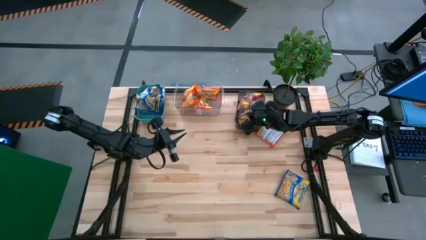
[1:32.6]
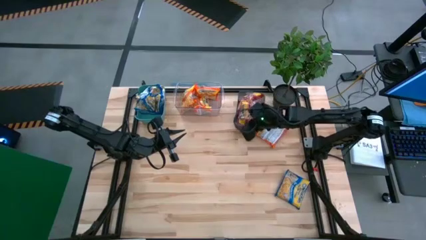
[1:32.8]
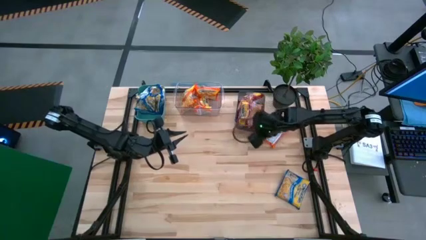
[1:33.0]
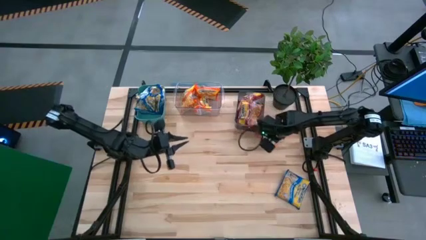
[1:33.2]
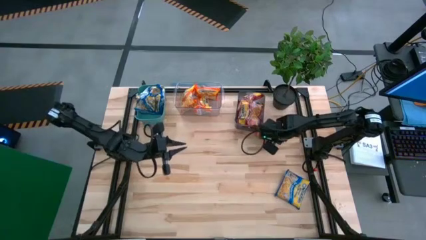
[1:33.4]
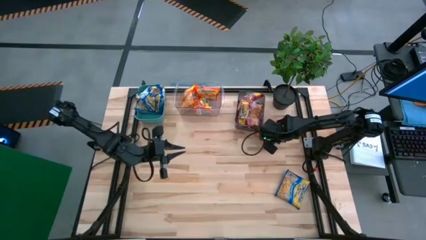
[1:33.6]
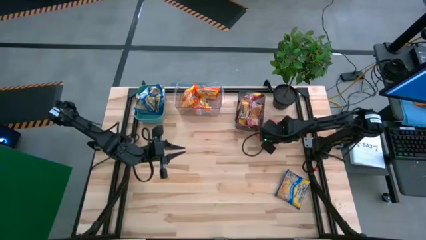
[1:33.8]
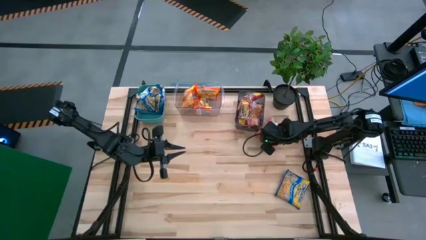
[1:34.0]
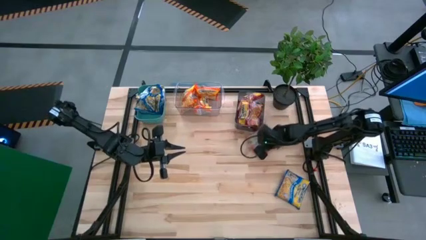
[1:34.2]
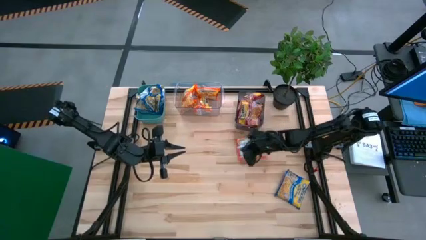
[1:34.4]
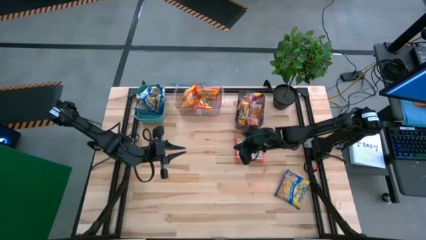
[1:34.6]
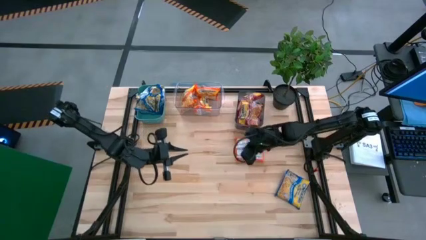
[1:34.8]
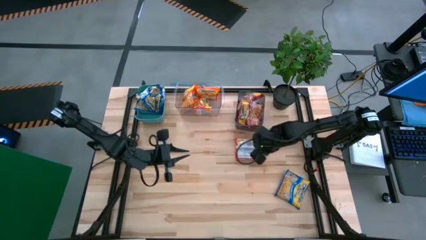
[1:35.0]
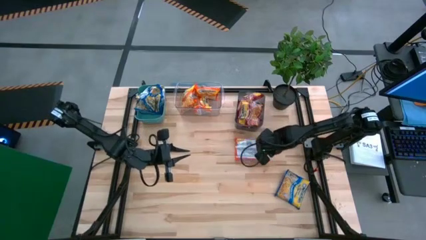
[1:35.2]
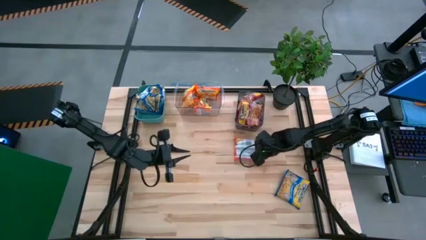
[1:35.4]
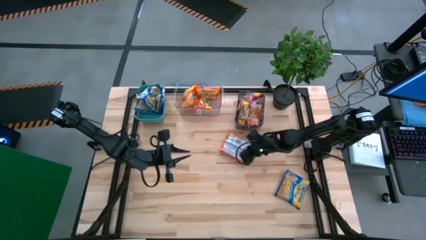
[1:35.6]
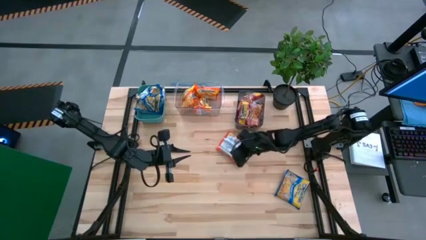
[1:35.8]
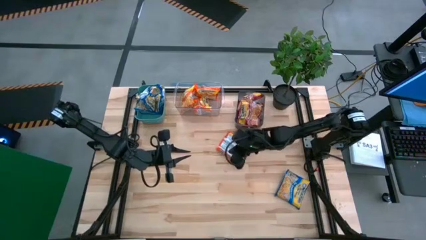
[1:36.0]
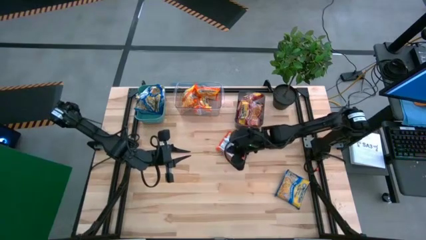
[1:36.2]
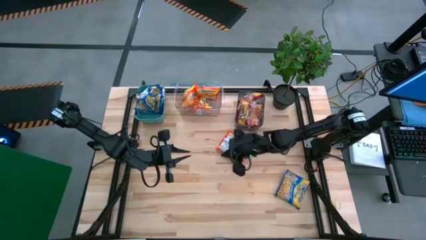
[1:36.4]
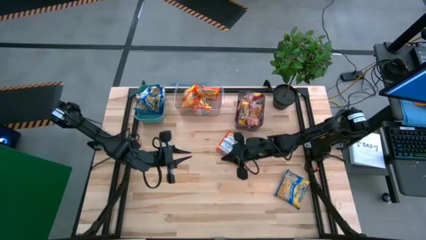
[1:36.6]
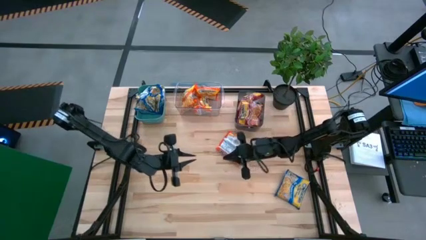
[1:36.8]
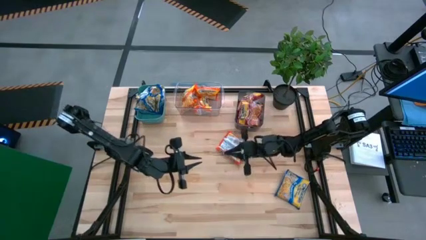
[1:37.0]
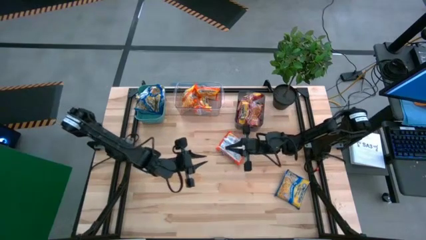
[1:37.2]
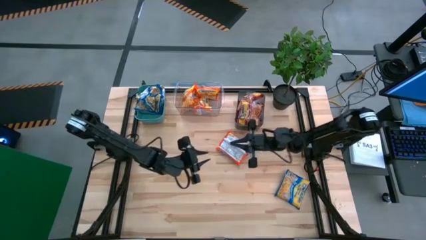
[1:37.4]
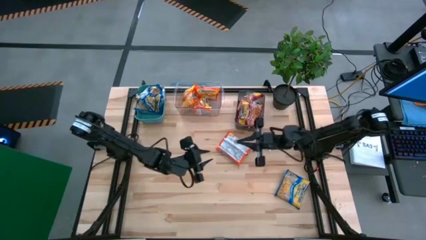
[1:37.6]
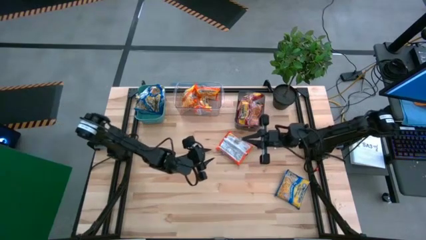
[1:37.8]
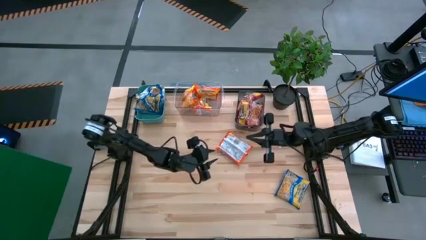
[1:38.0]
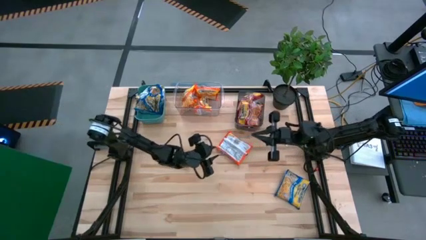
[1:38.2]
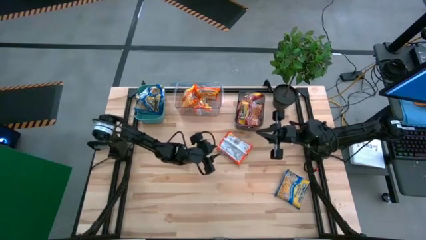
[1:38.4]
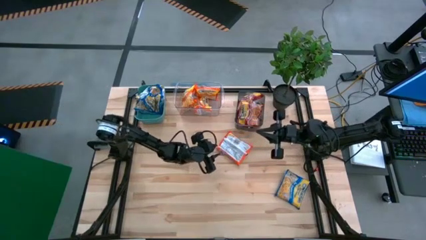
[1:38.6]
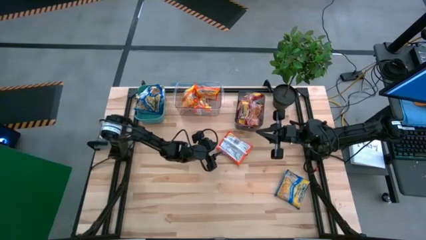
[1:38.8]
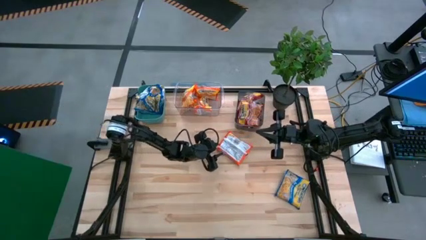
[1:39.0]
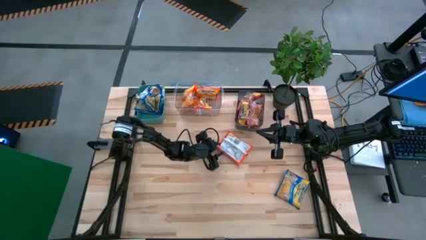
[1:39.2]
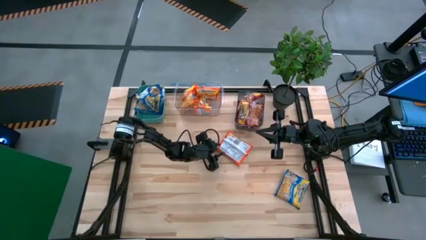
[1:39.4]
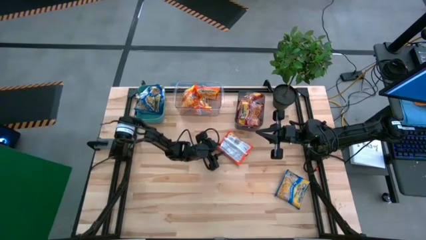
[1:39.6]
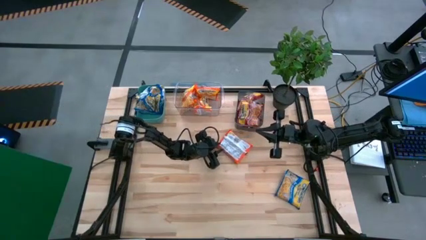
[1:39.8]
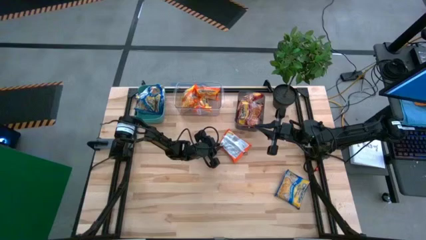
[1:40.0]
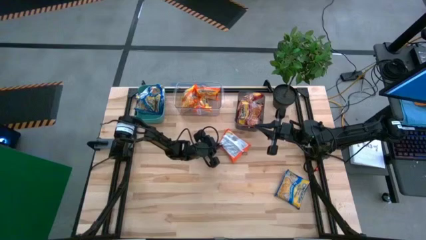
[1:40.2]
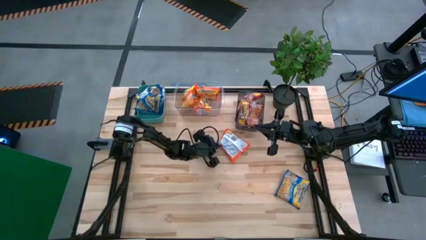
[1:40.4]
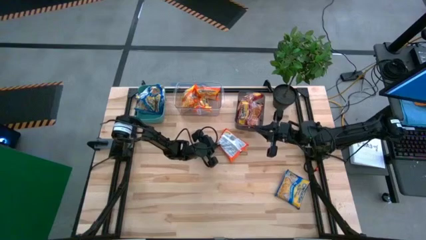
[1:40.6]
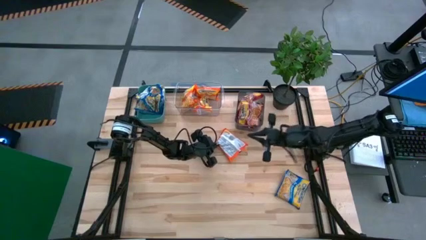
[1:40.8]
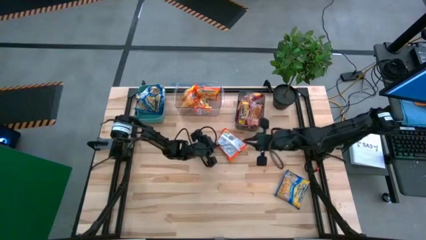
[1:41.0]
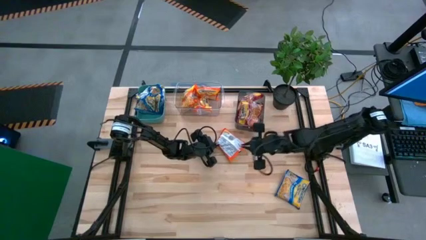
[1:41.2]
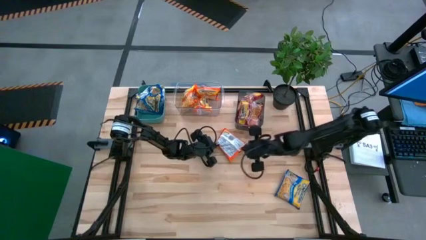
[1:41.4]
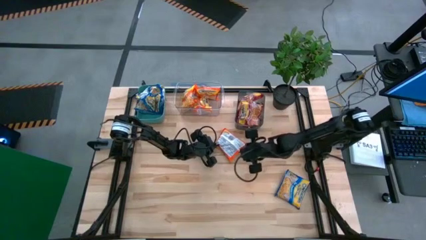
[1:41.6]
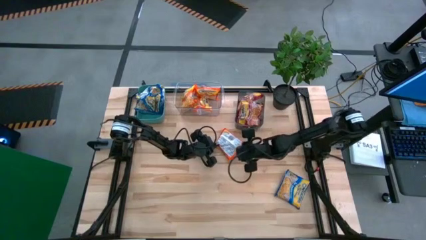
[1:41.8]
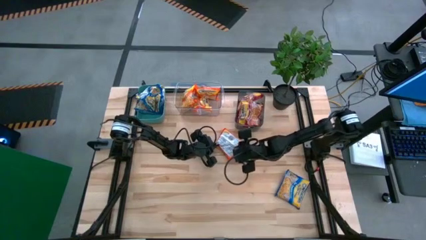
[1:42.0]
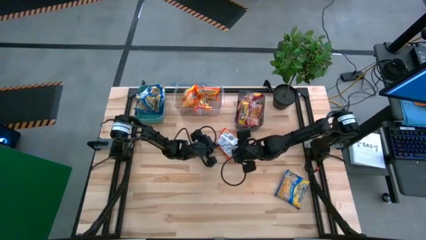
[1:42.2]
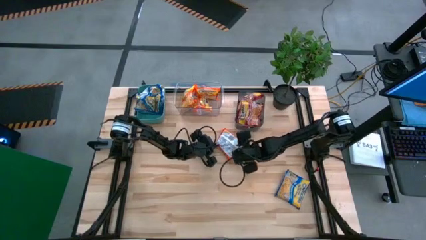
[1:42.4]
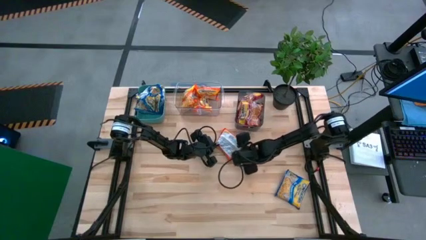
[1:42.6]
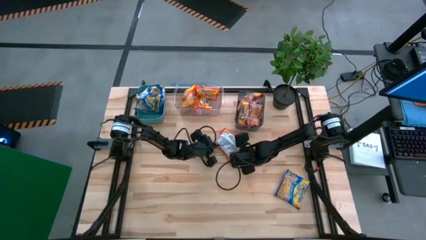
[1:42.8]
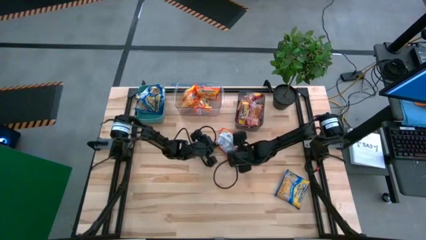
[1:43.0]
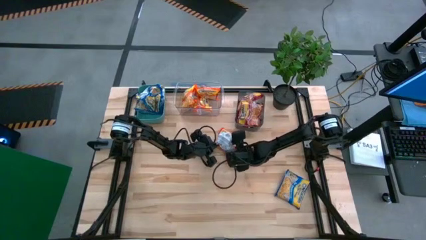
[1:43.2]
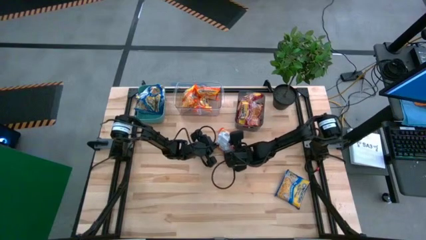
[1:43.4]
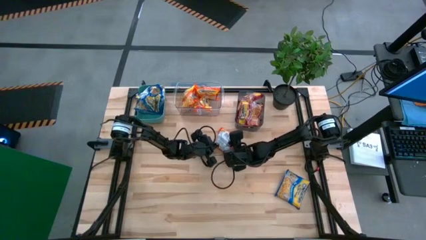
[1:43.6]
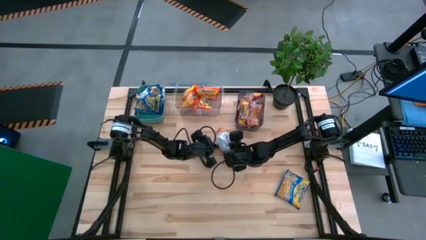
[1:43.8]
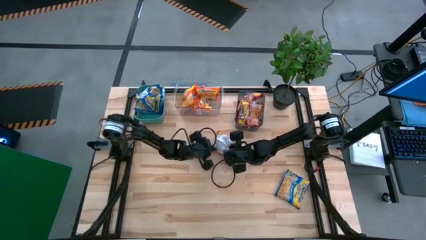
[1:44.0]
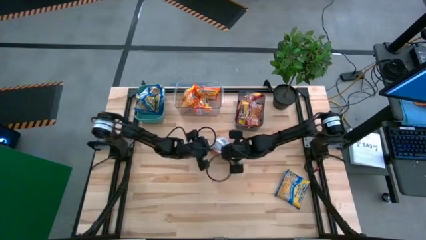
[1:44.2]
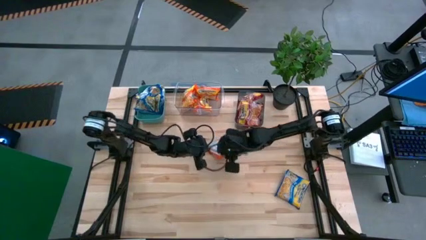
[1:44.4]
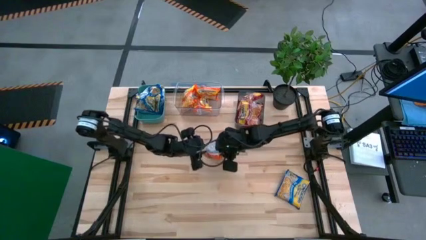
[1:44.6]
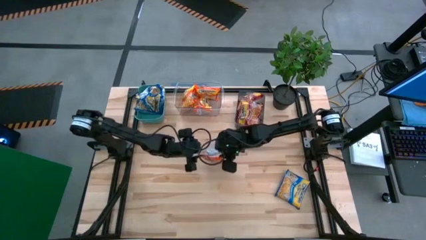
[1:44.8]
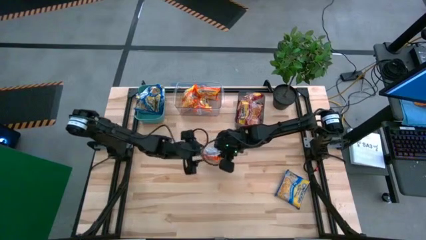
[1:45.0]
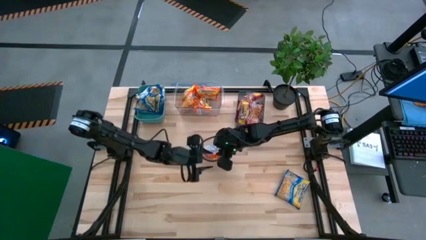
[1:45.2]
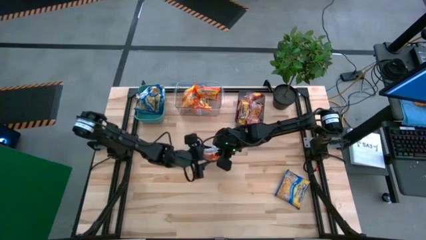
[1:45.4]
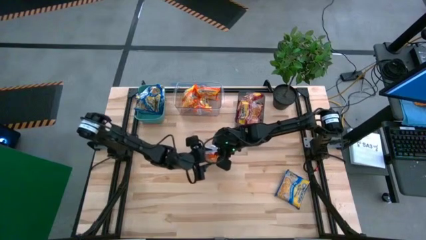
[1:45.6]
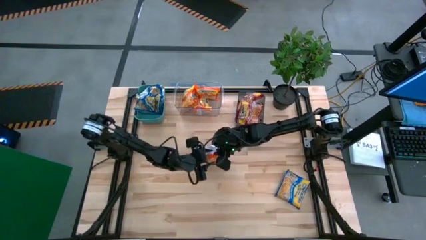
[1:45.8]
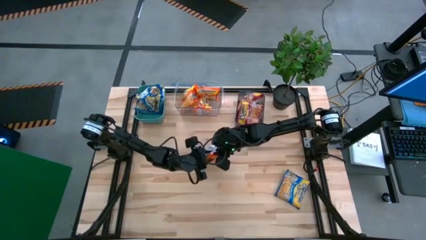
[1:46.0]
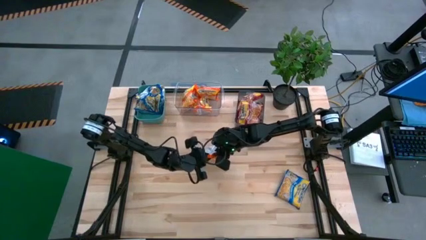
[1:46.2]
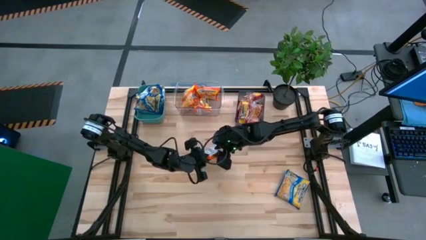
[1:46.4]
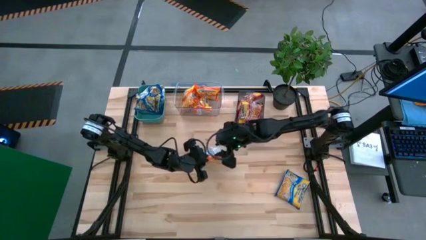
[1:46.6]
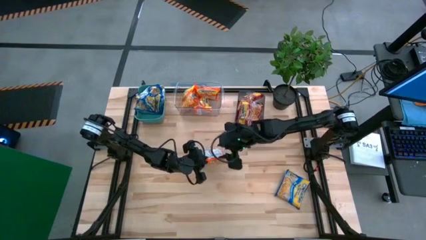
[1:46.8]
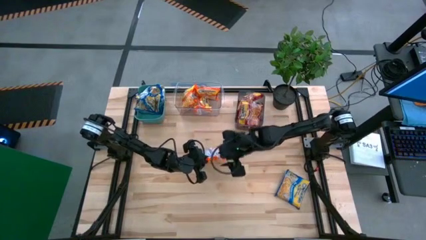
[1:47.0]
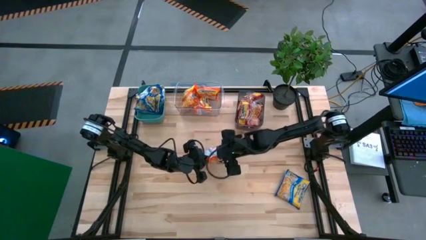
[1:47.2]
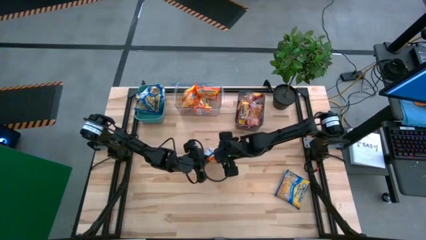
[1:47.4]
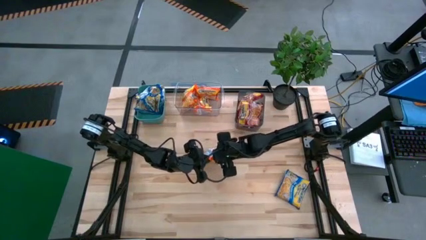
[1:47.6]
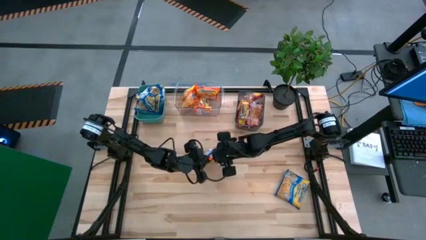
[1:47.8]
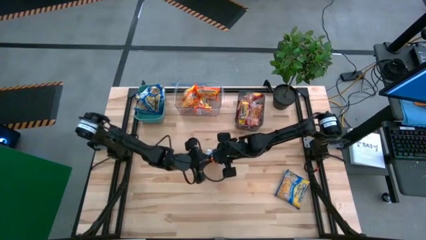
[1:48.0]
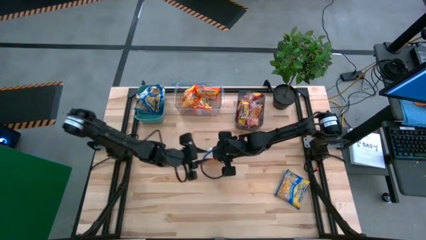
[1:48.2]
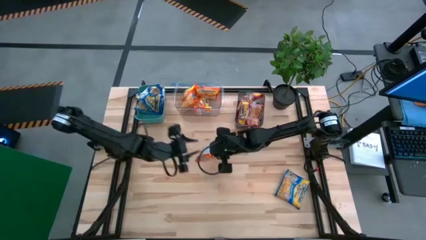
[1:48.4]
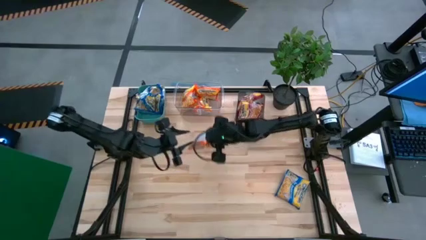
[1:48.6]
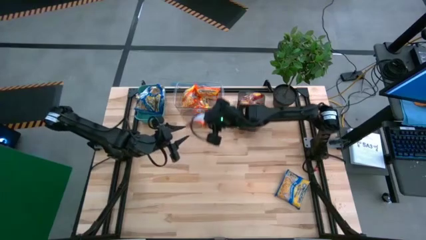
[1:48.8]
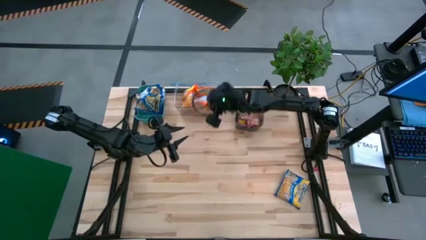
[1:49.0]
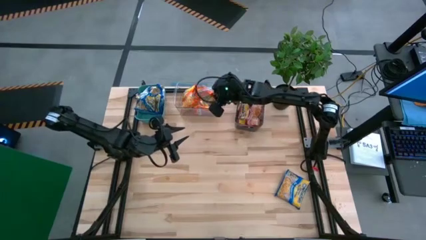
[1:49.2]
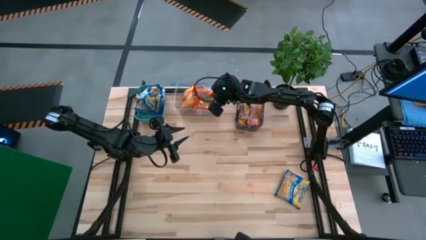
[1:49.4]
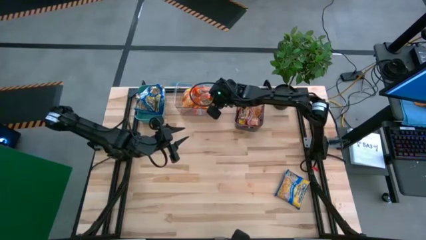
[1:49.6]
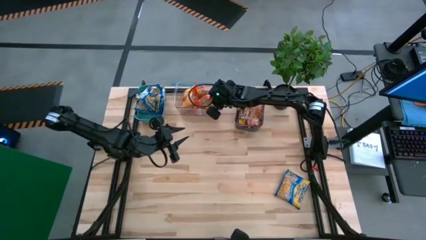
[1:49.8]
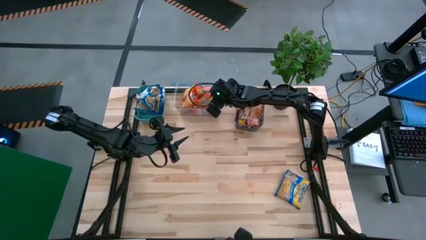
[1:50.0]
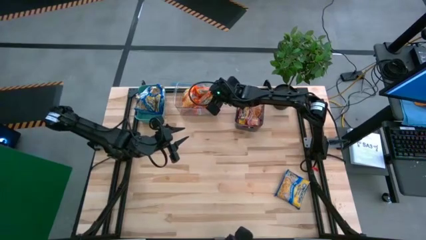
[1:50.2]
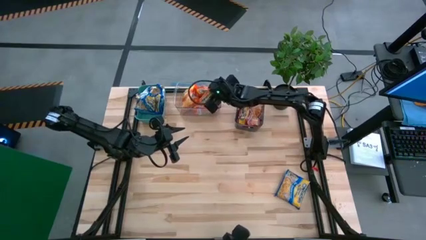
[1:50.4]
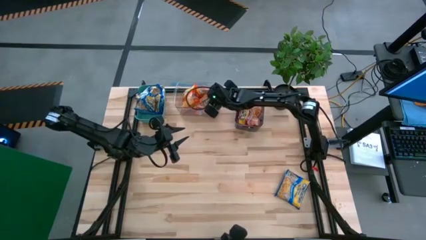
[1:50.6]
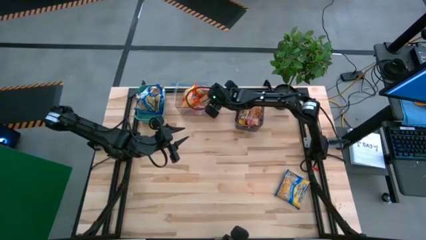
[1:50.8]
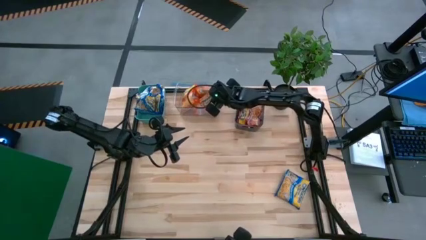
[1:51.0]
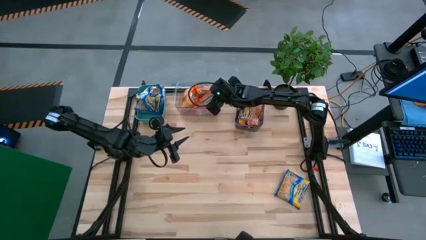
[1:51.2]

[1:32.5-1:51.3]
Task: Sort Maruchan noodles
Put the orange noodle pack into the transparent bin
